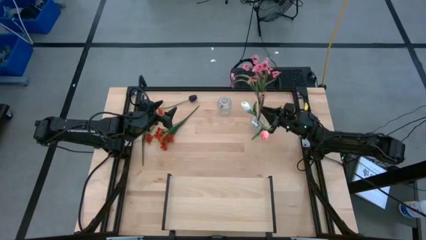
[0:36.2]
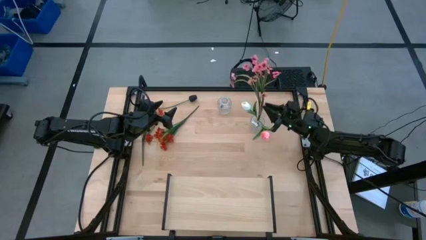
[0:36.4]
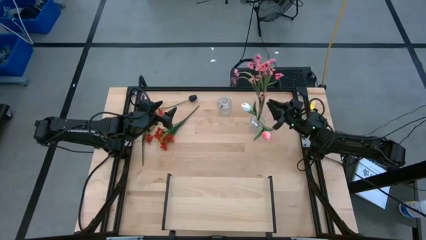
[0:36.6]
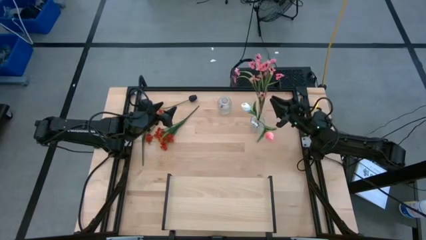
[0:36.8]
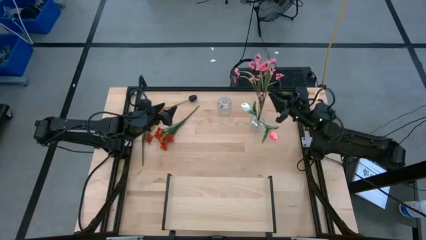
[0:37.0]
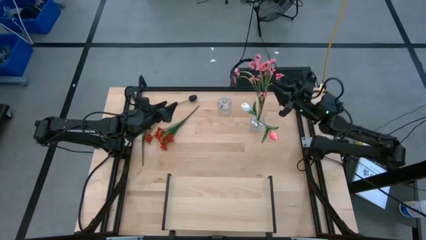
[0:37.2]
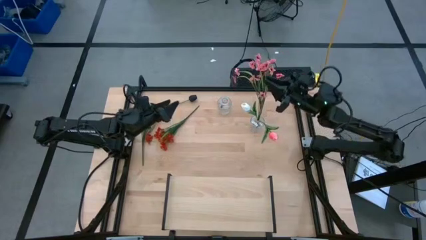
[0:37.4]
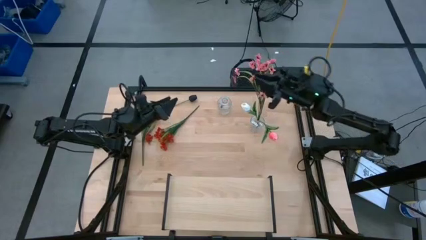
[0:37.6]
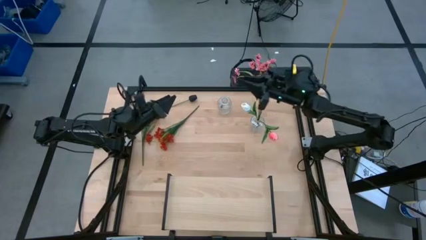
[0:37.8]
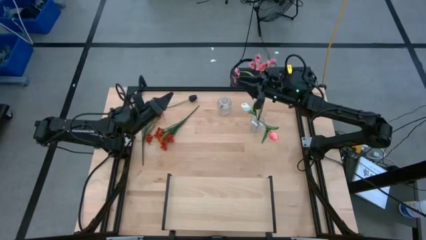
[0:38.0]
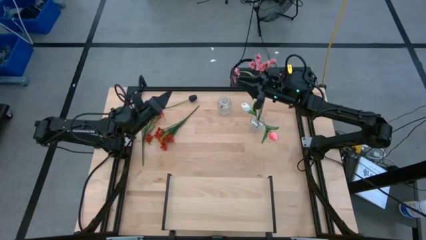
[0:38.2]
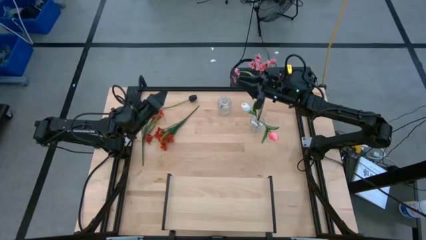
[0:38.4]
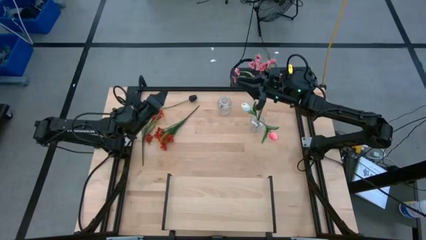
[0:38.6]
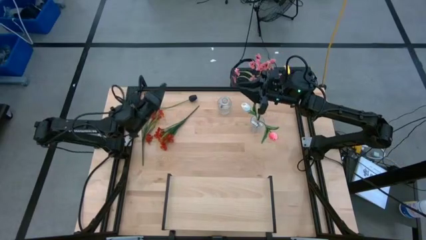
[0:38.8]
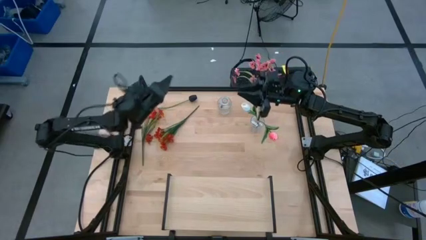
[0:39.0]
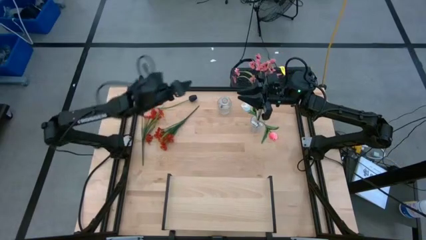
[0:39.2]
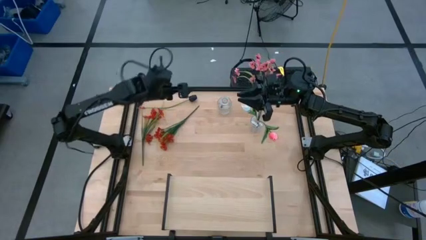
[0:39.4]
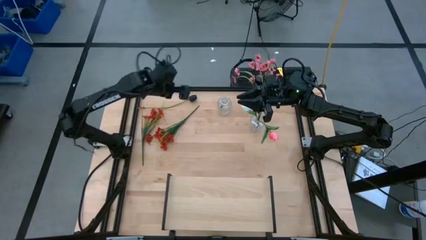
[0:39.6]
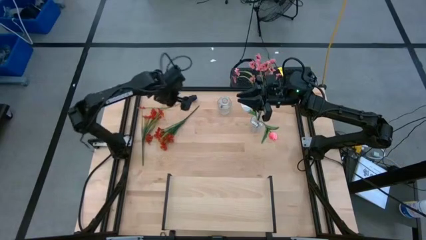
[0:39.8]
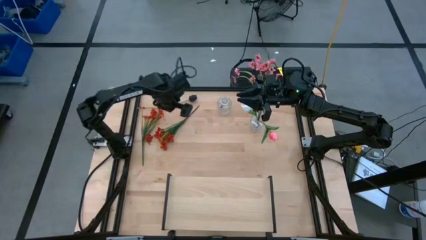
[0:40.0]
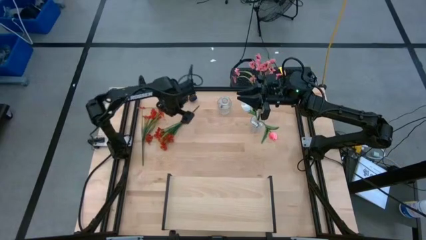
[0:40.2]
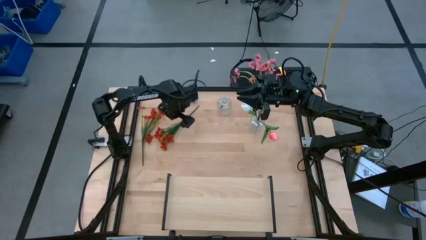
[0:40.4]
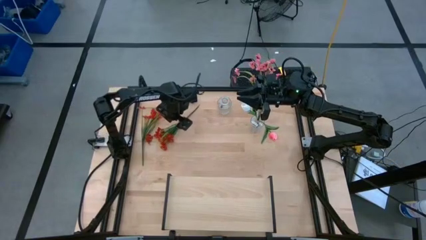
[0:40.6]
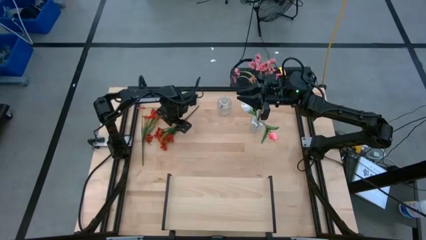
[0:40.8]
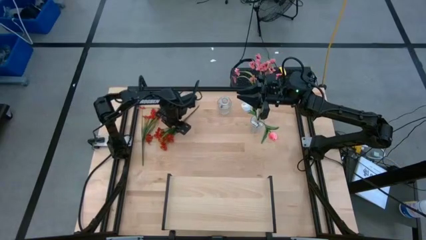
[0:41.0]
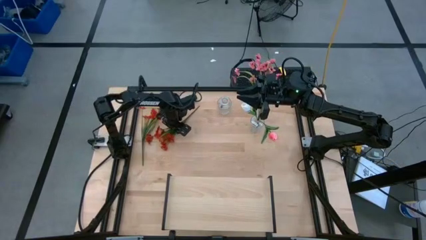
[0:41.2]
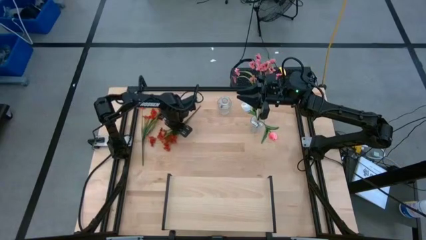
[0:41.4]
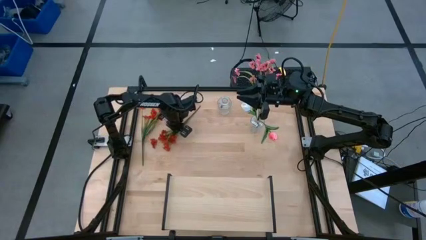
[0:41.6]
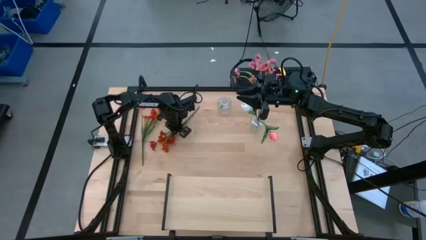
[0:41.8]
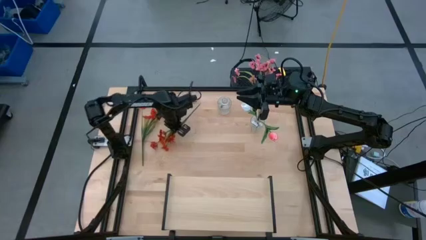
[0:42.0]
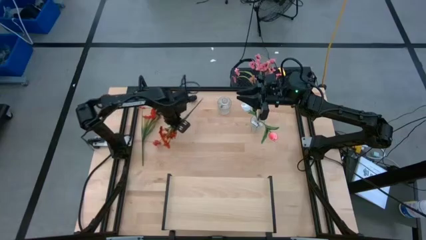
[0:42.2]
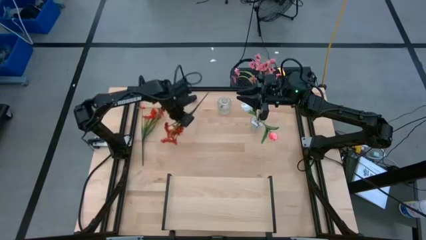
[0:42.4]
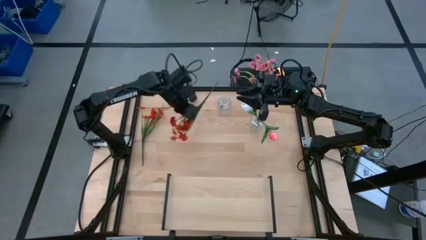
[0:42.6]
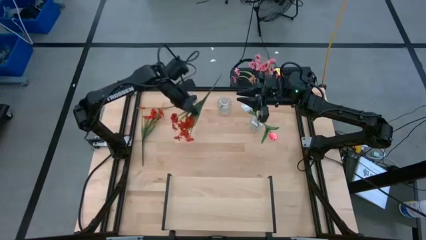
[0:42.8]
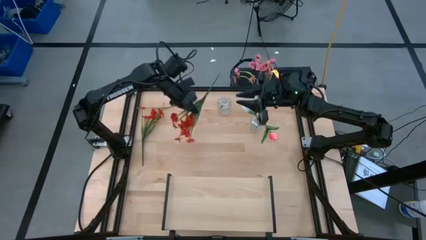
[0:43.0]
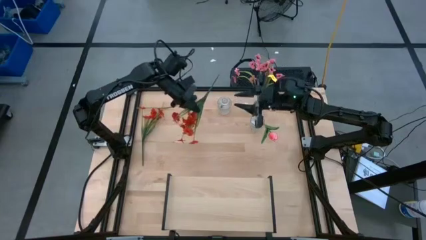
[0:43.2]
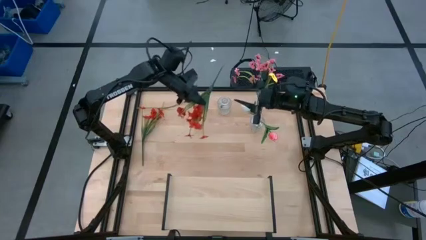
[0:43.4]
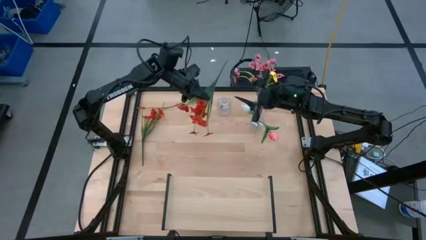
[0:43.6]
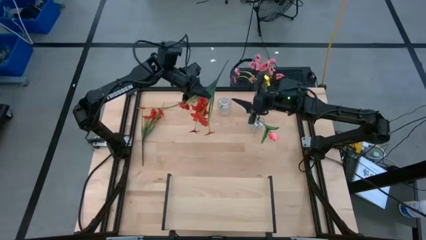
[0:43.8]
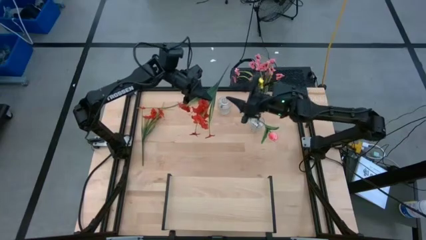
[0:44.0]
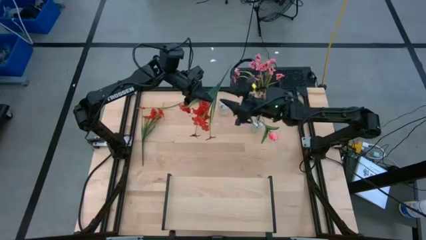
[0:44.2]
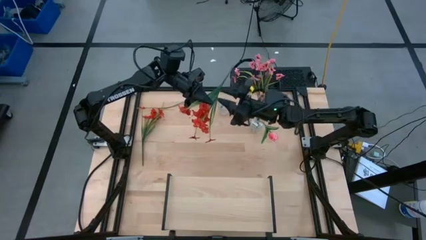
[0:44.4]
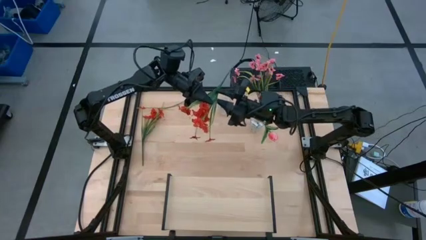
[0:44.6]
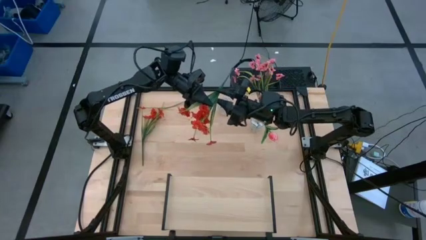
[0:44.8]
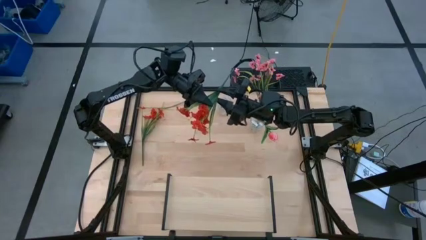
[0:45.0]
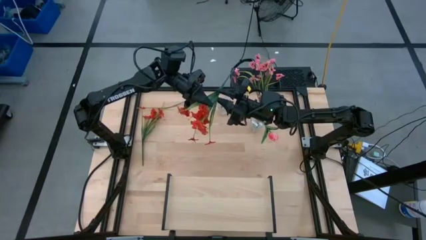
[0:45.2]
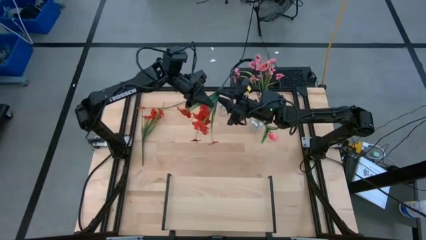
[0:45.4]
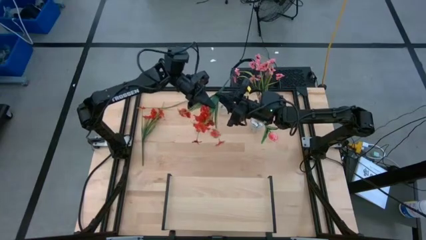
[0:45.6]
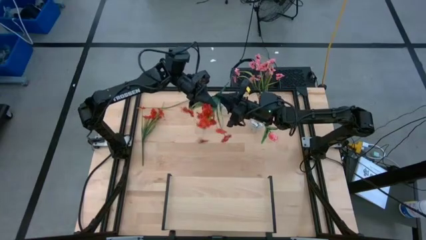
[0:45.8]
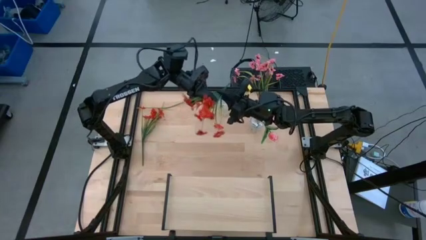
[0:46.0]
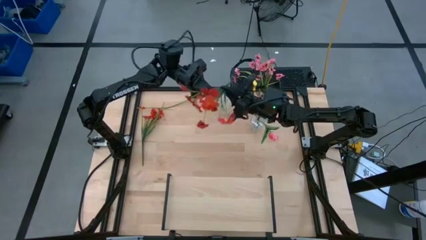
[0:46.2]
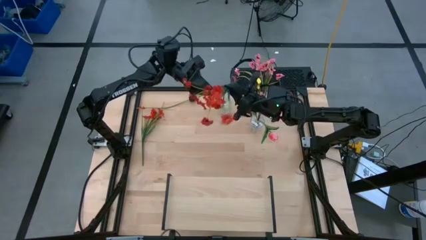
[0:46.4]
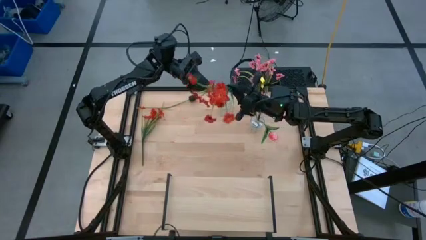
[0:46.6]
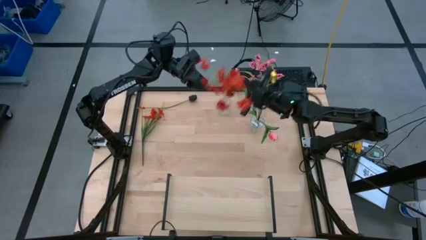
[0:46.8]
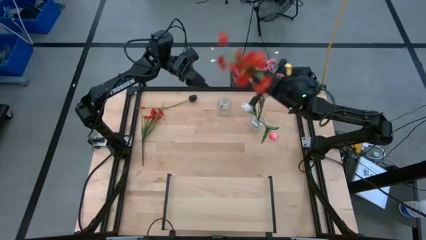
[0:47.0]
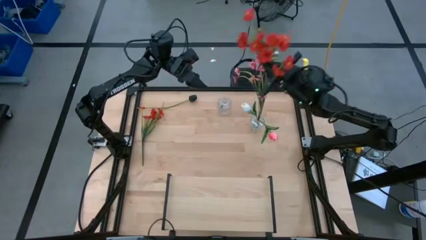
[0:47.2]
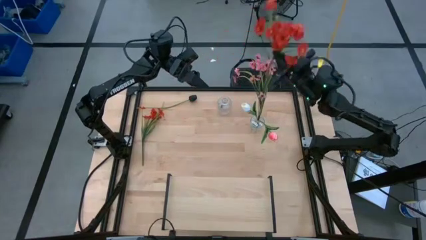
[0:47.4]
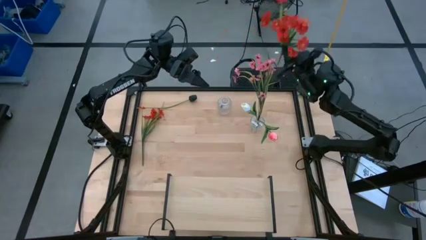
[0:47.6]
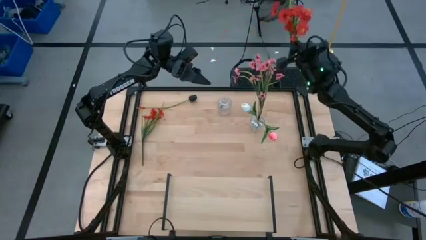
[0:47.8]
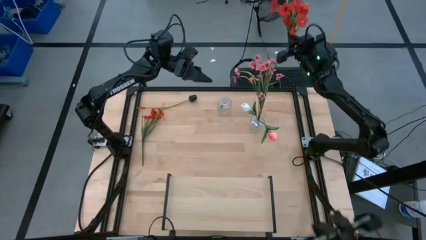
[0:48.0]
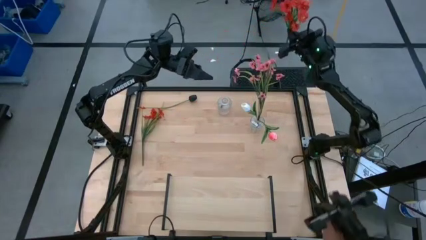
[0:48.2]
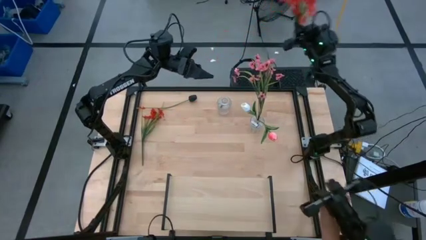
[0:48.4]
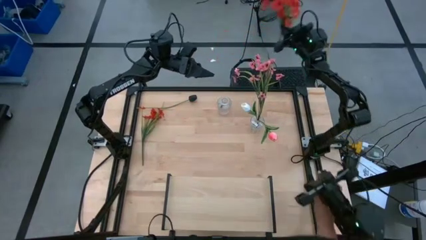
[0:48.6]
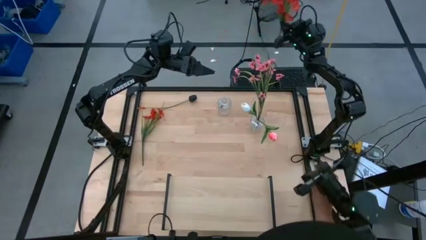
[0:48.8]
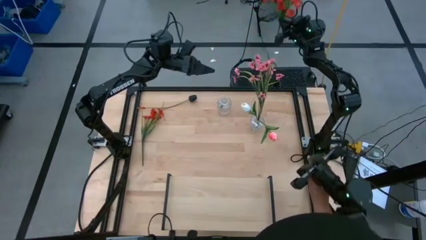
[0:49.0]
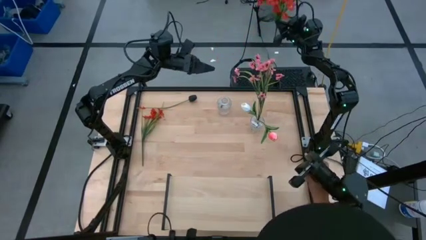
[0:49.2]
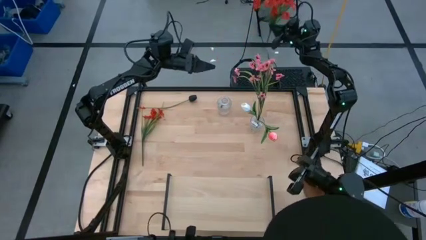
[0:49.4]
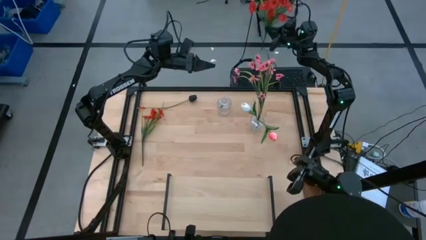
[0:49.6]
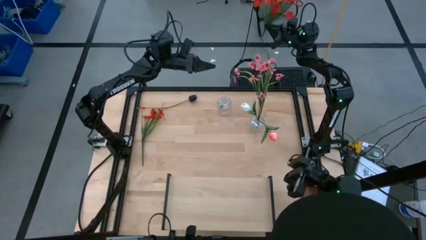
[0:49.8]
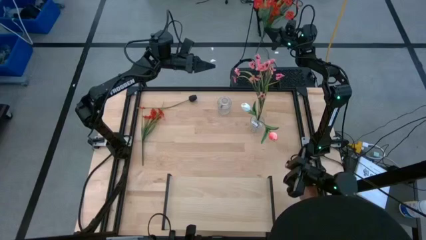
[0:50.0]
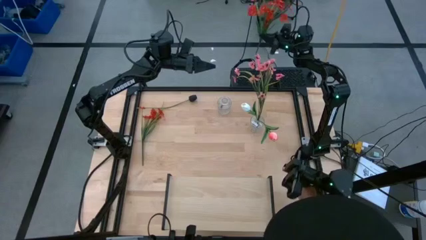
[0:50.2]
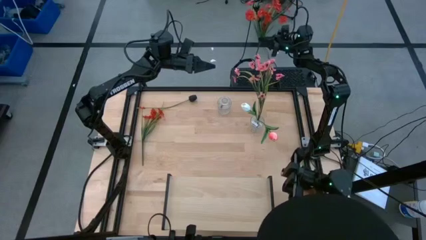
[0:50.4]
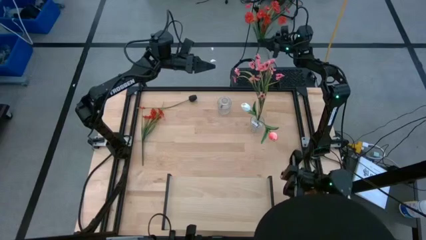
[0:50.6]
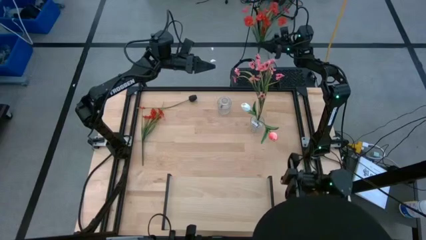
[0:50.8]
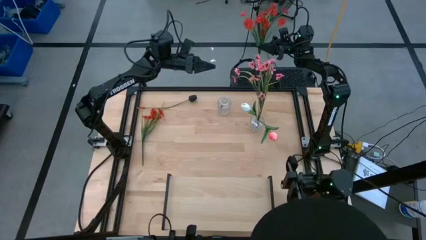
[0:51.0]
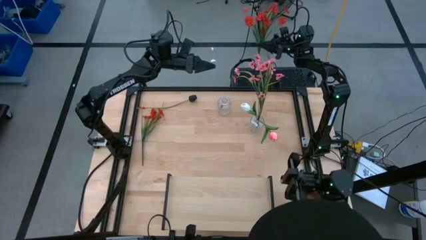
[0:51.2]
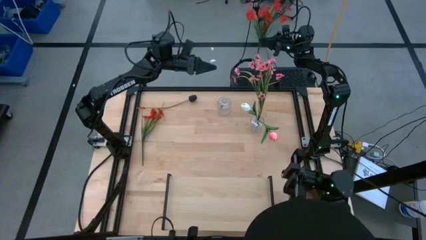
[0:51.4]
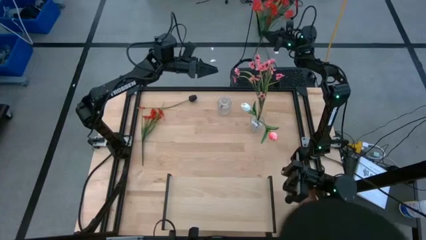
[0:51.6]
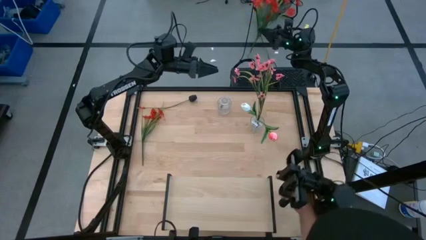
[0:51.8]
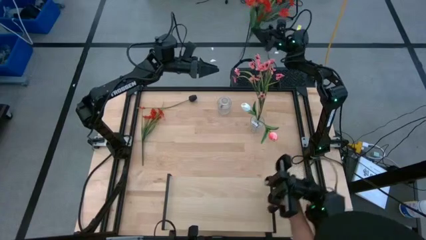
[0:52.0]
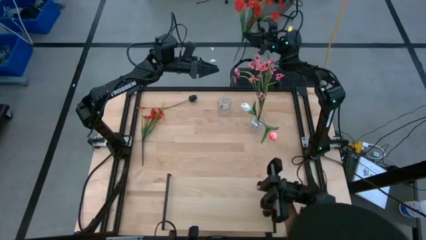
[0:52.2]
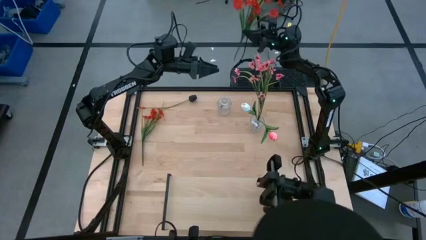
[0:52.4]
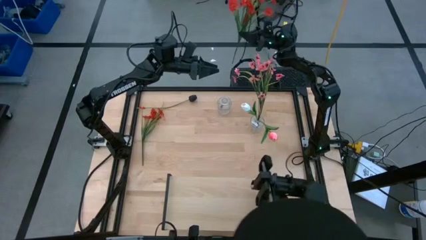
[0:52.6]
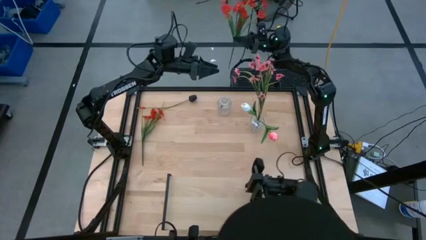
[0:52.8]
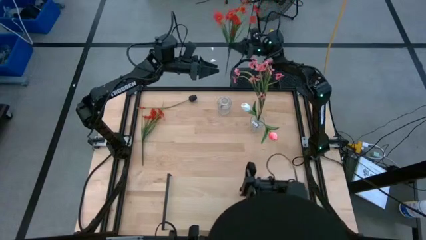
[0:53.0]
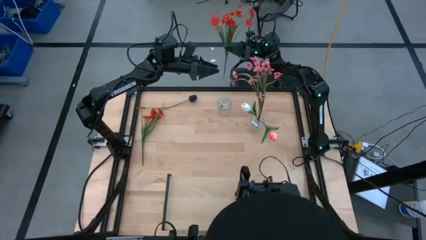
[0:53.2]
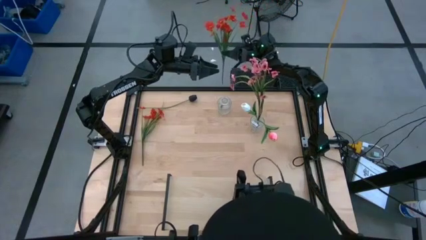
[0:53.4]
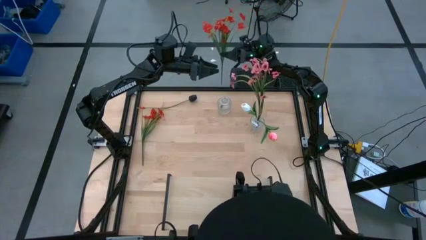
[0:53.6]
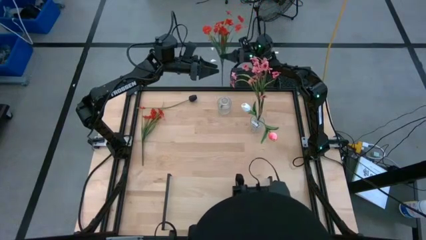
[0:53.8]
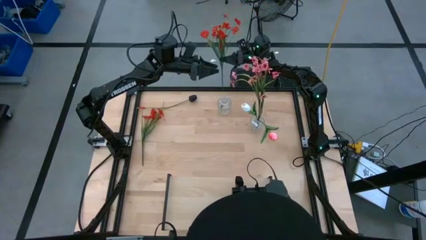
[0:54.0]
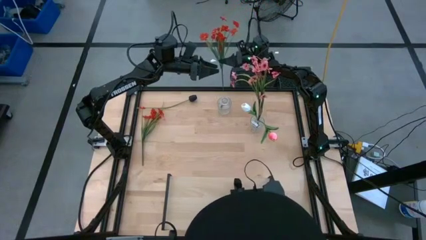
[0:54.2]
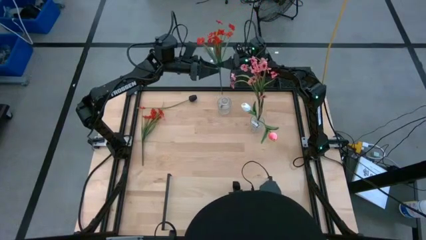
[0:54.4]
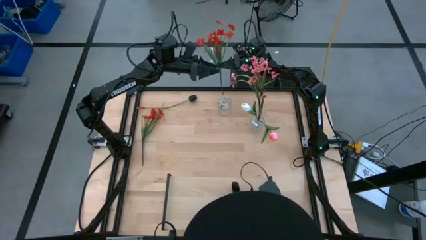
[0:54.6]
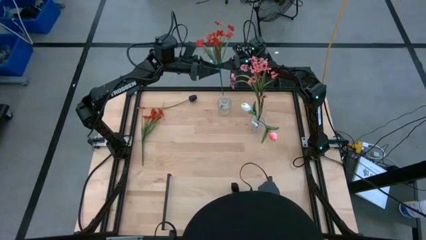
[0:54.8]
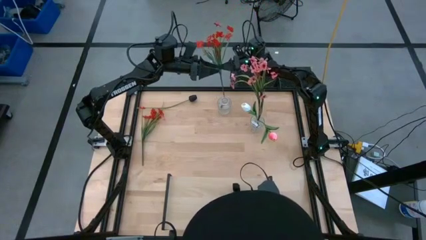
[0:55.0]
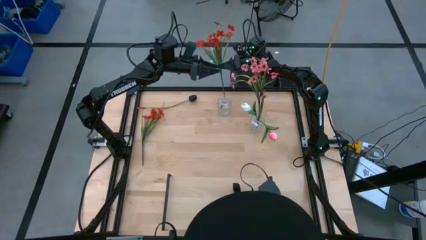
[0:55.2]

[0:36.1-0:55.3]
Task: Pick and place flowers into a vace then onto a shelf
Put the right red flowers into the left transparent vase
